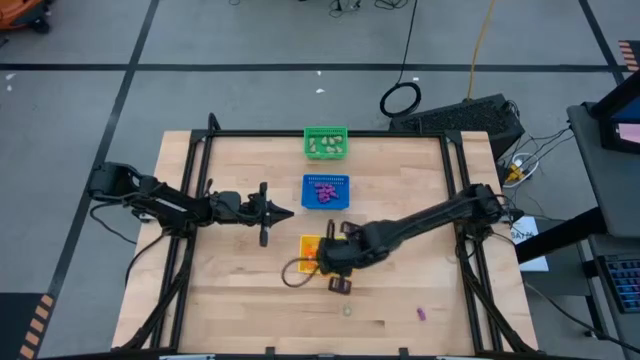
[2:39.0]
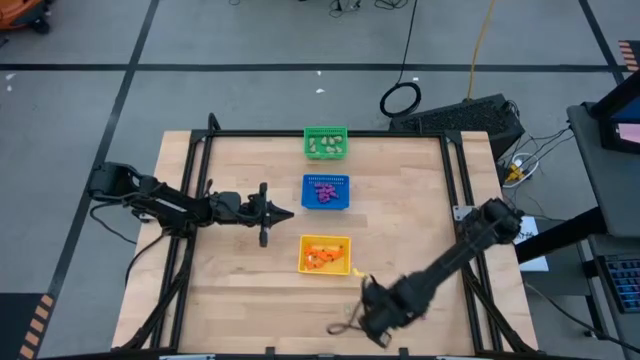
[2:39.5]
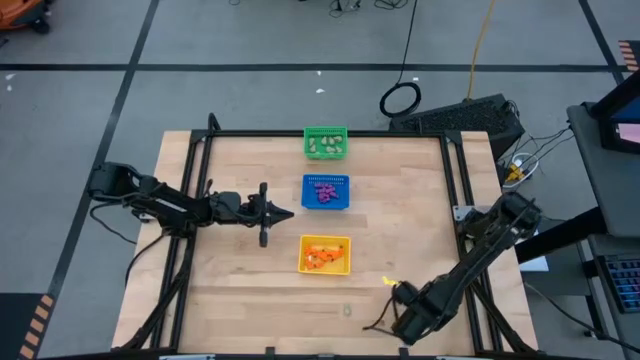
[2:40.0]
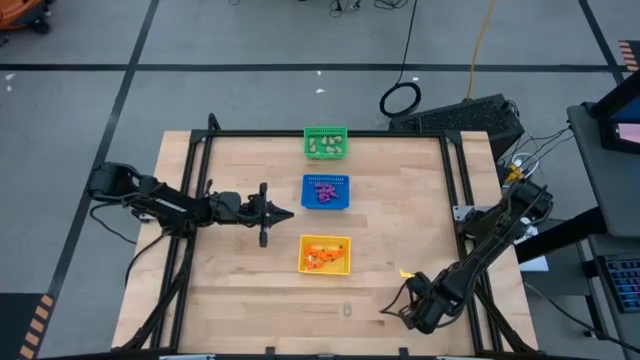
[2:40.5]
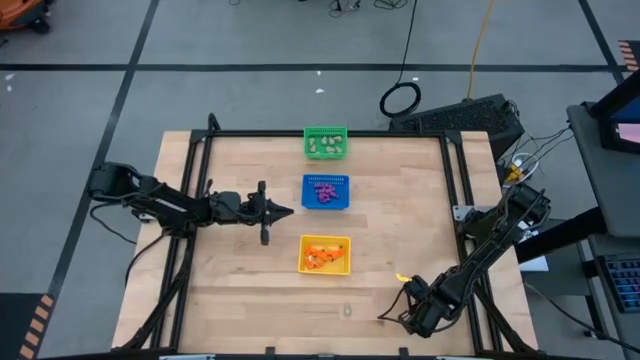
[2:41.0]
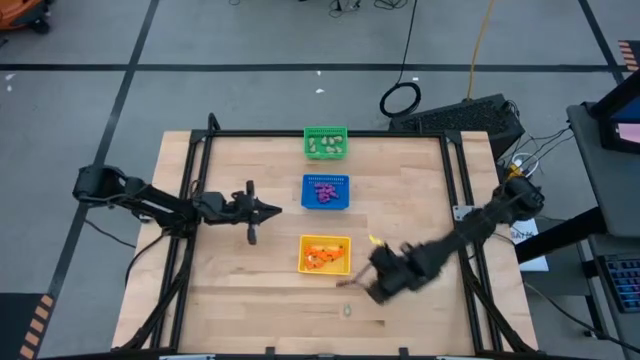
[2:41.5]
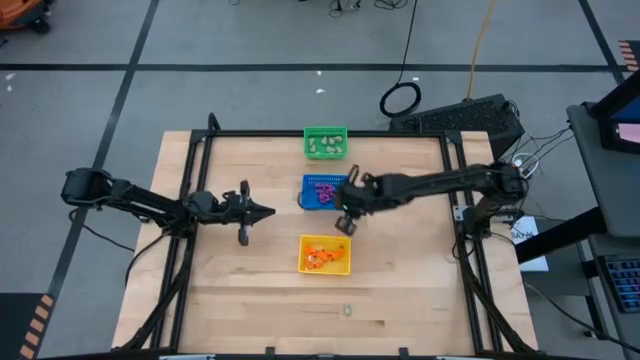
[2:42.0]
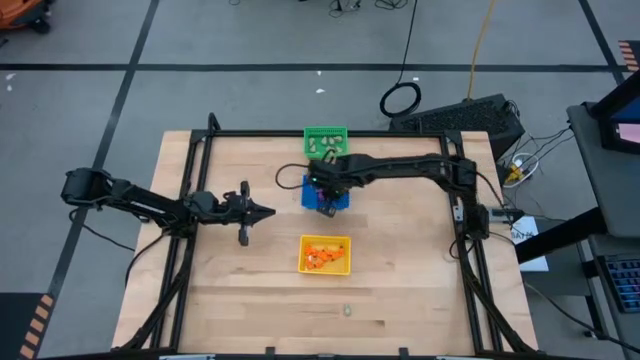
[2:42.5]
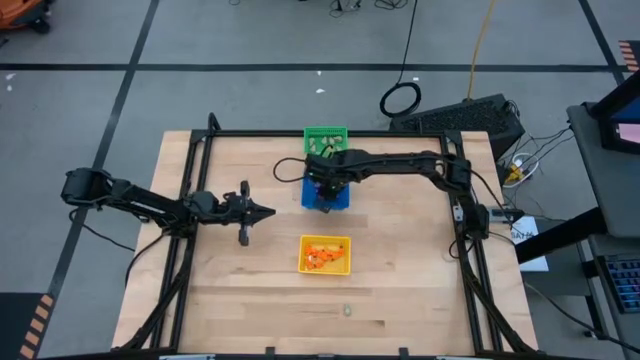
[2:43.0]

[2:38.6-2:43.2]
Task: Sort Halloween decoration
Put the purple skeleton toy into the blue bin

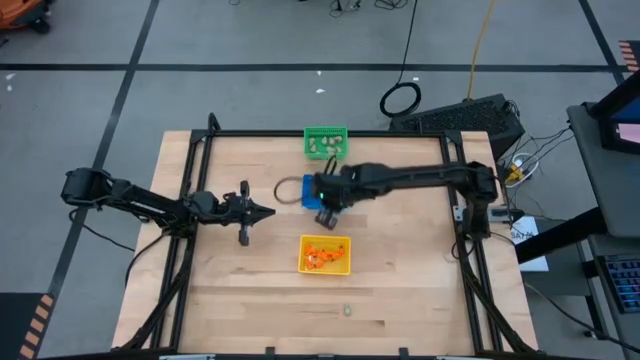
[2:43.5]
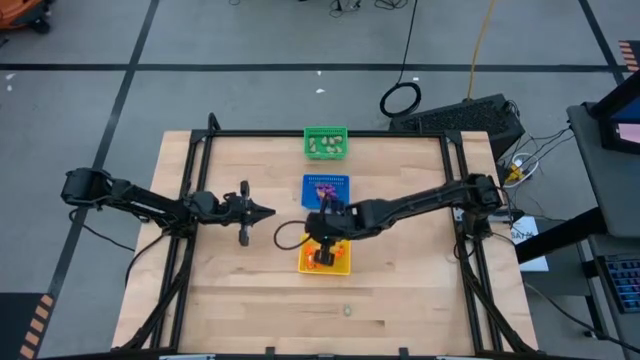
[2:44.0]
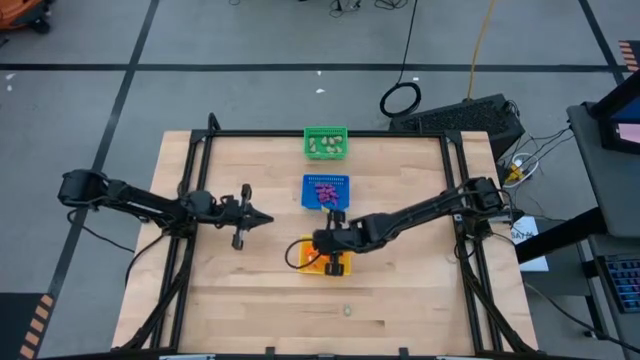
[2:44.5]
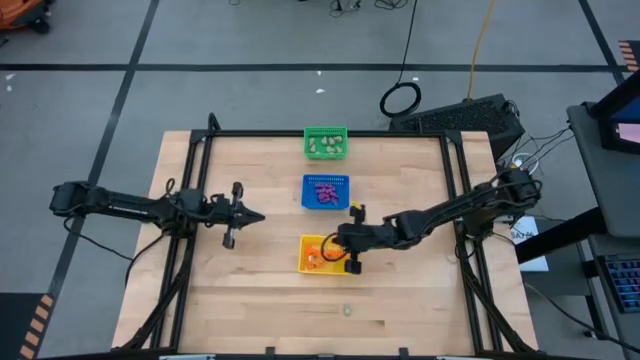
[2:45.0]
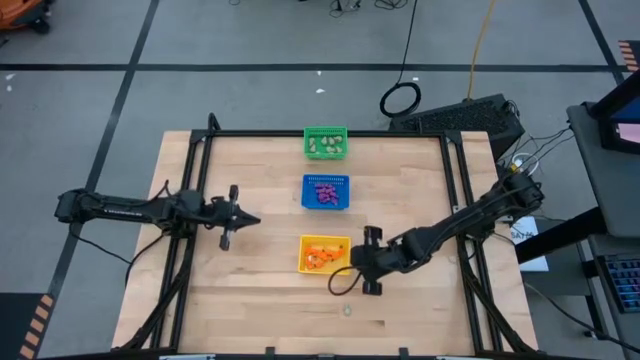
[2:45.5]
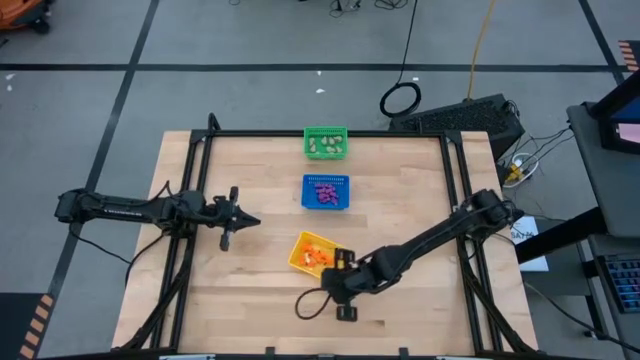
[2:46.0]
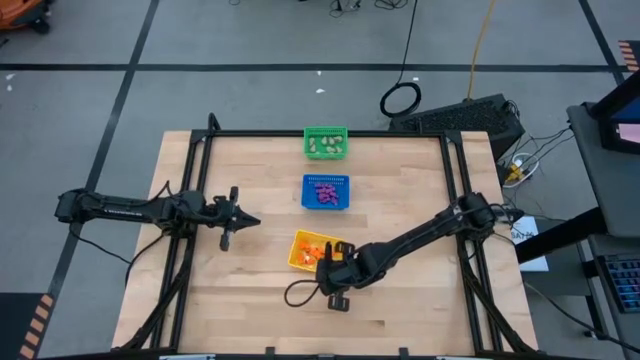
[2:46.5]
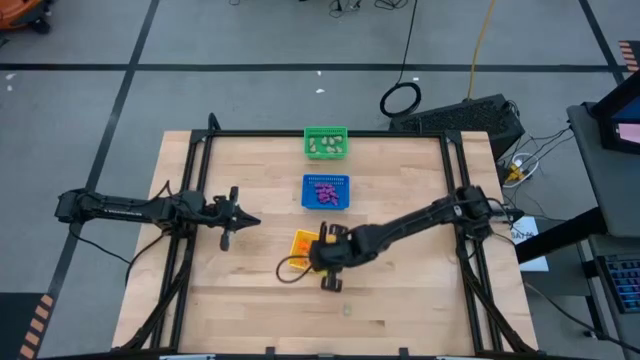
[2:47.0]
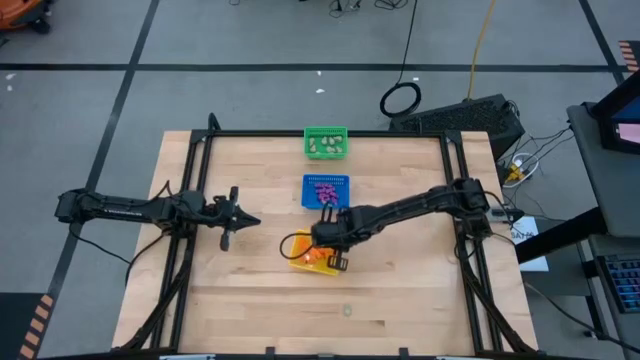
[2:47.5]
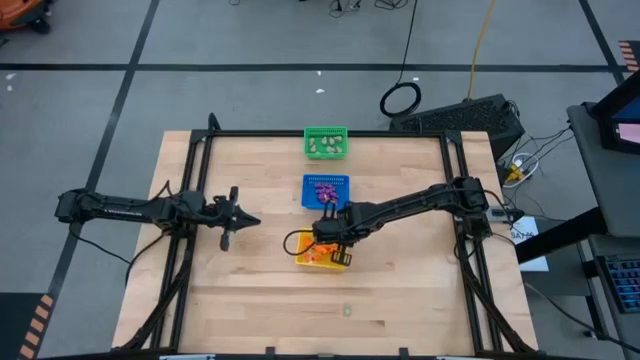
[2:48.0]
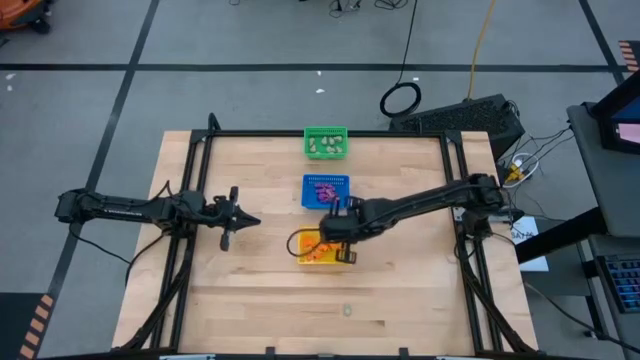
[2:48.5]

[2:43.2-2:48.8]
Adjust the yellow bin

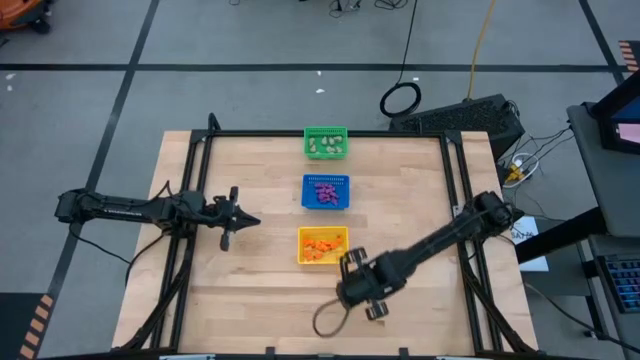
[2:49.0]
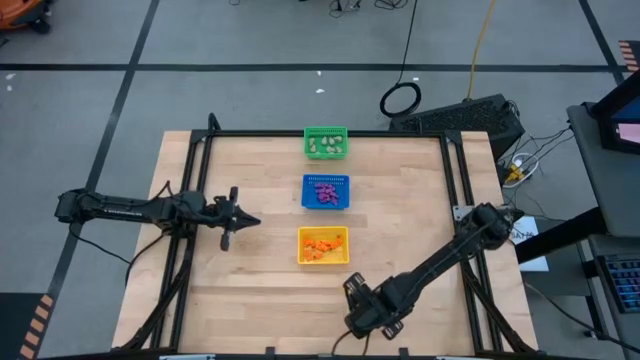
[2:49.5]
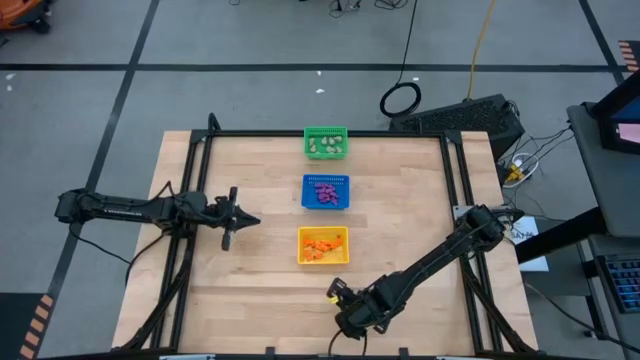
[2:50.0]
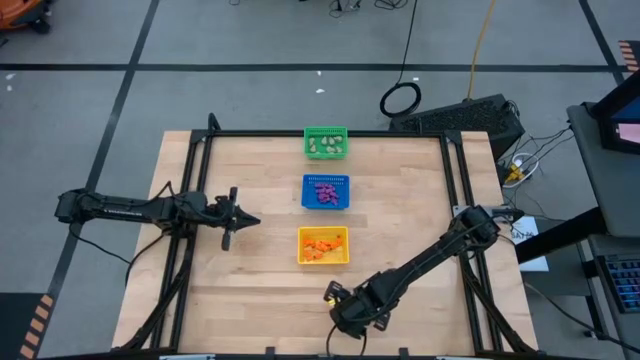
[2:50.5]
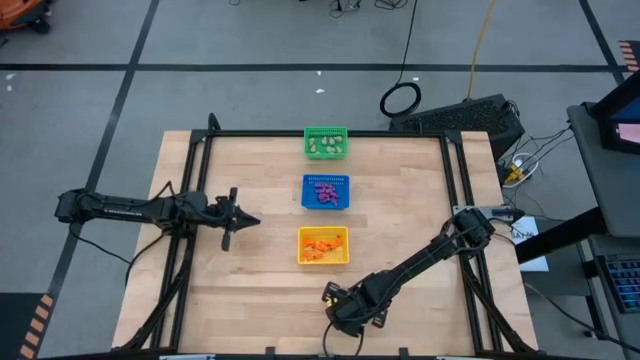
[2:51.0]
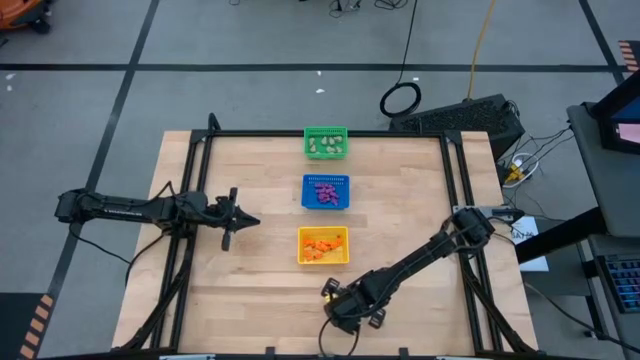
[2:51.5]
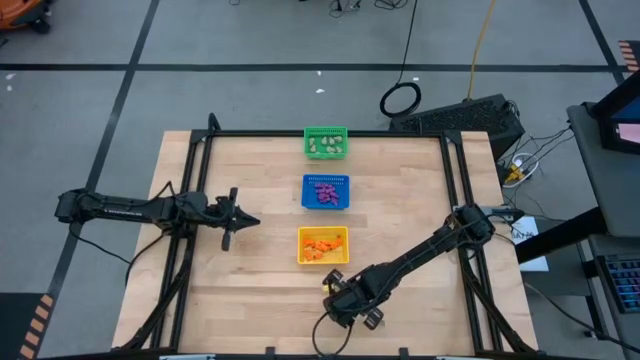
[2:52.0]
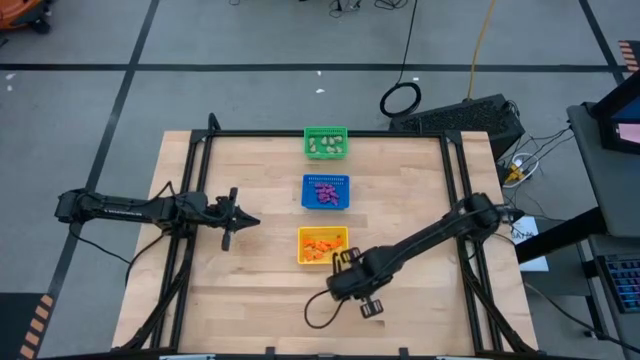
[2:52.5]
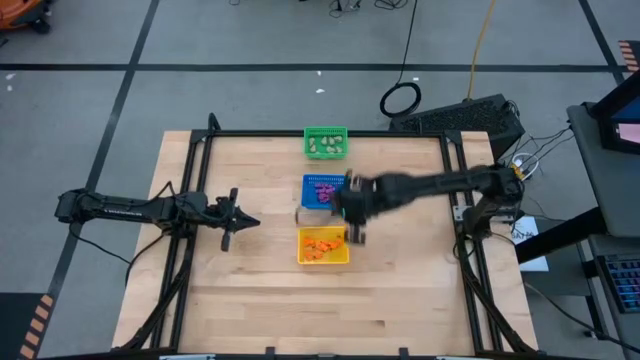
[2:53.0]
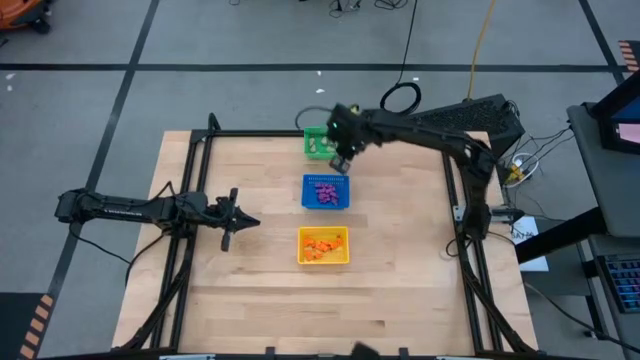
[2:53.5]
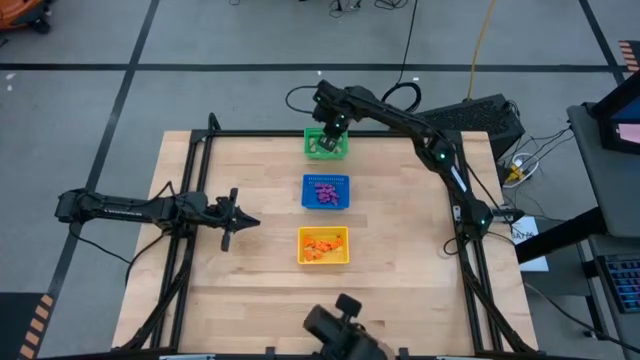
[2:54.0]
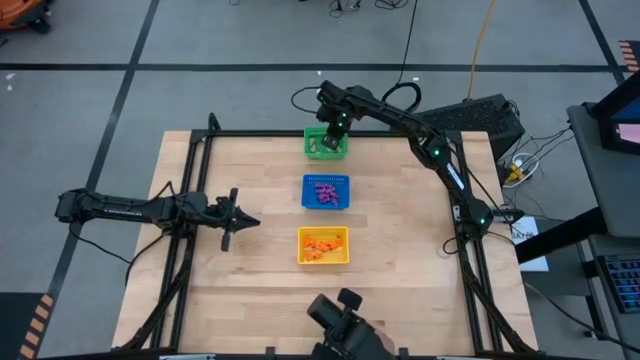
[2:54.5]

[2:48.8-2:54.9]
Put the white skull toy into the green bin

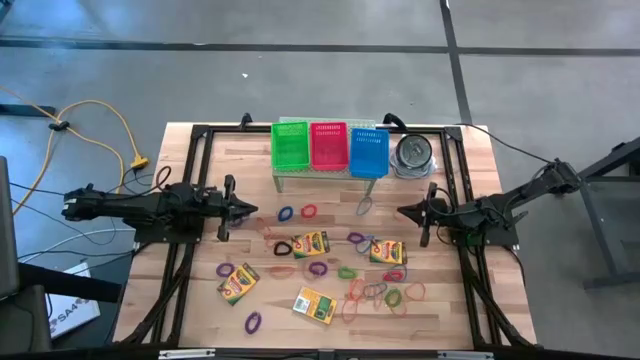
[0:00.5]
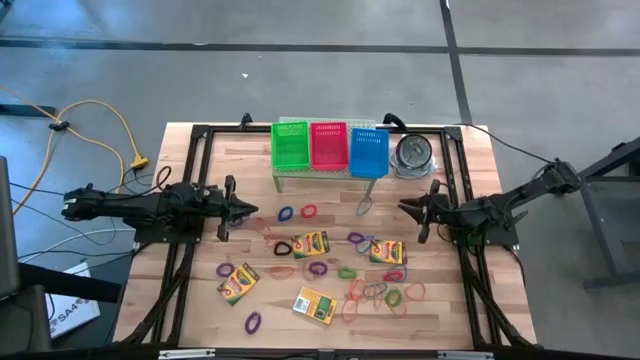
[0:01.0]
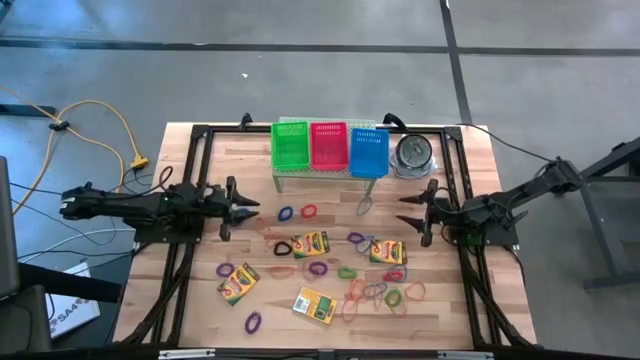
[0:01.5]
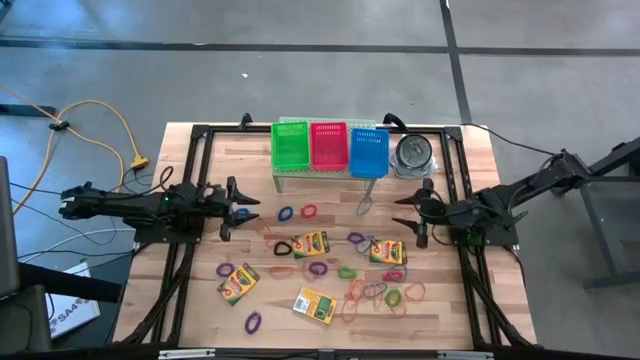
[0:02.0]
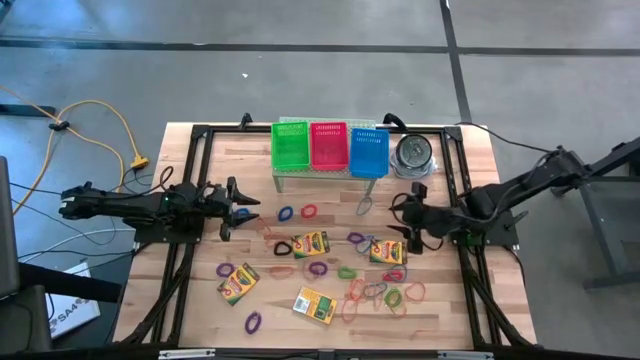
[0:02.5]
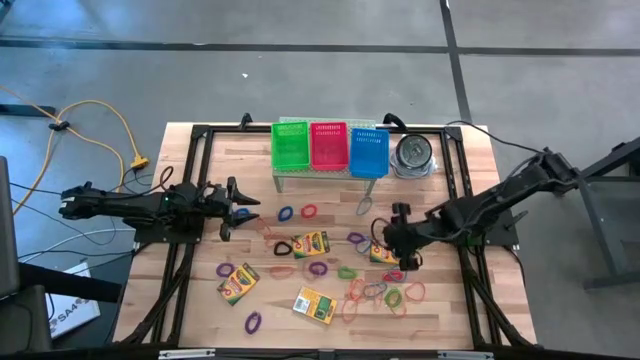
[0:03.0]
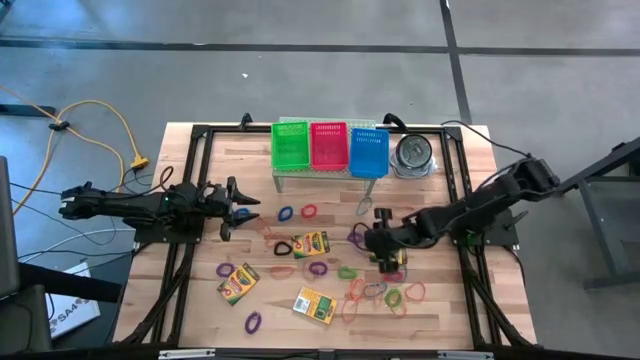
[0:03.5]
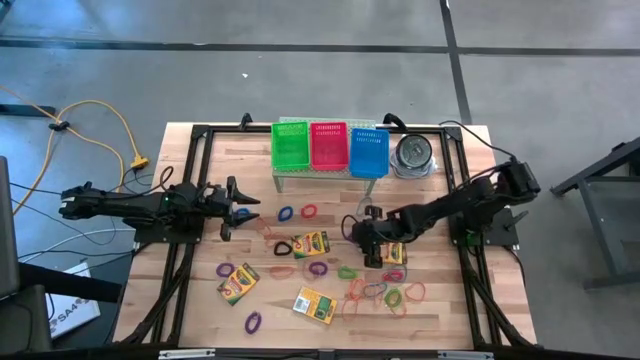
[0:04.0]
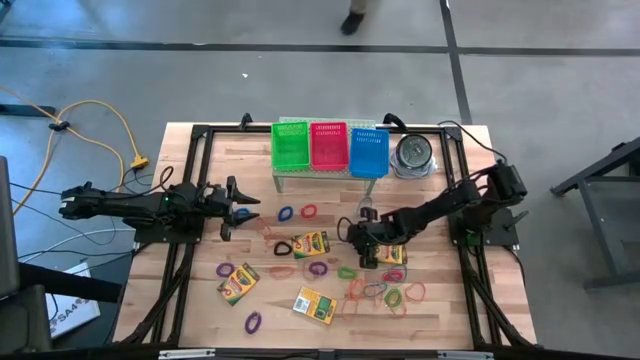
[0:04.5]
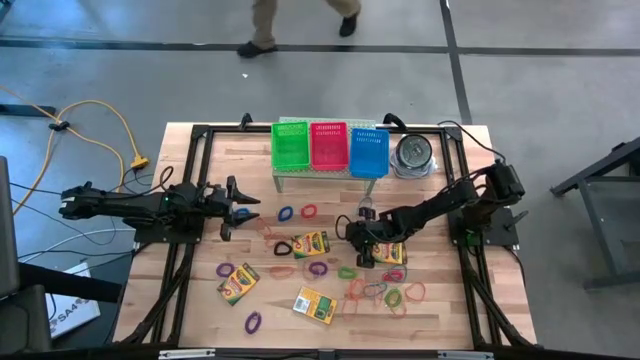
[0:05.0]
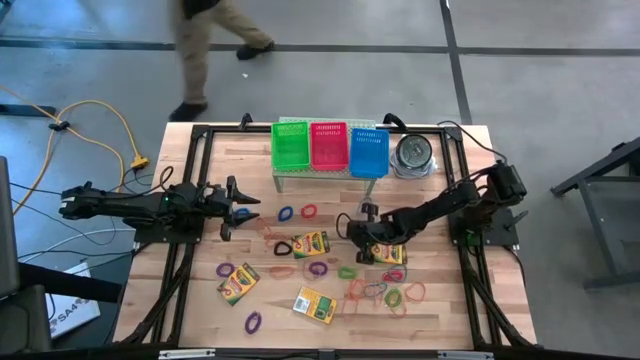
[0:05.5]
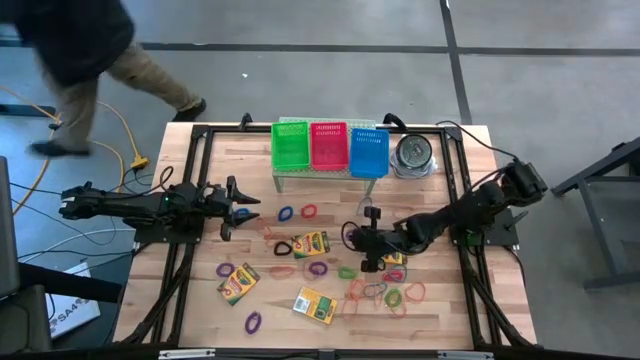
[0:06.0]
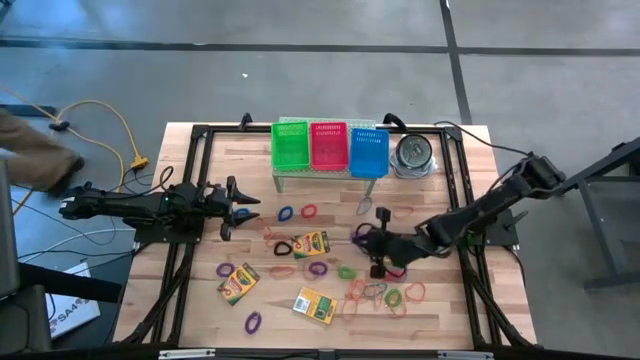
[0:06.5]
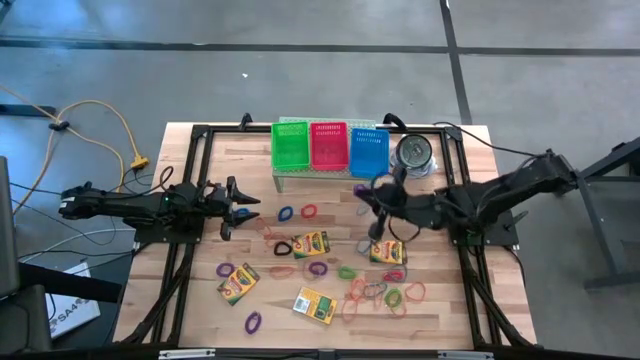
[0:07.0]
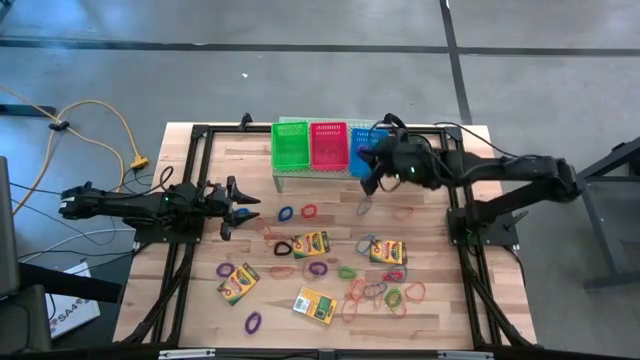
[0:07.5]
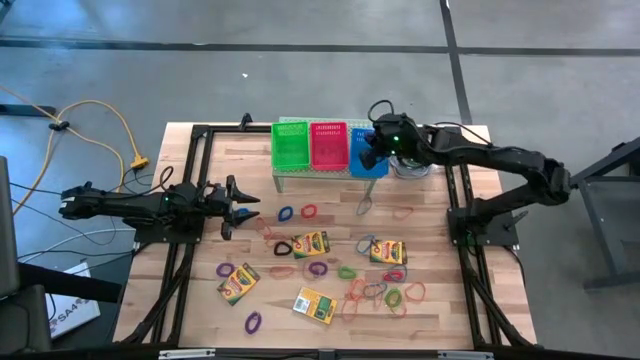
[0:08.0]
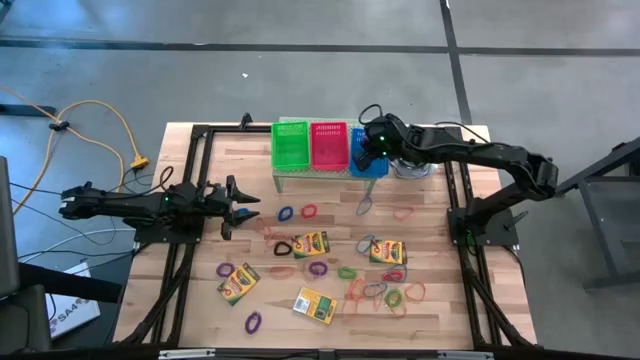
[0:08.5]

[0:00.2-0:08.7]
Task: Pick & Place Office Desk Supplies
Put the violet spring keychain into the blue bin on the shelf
